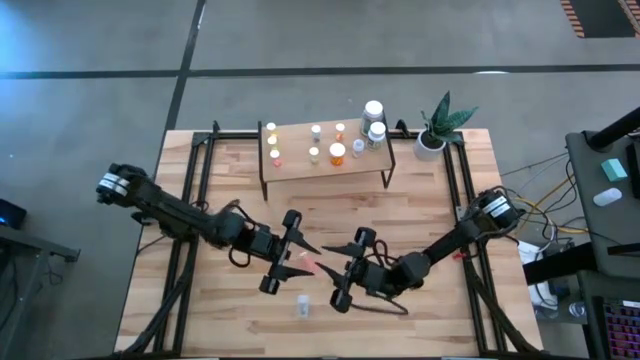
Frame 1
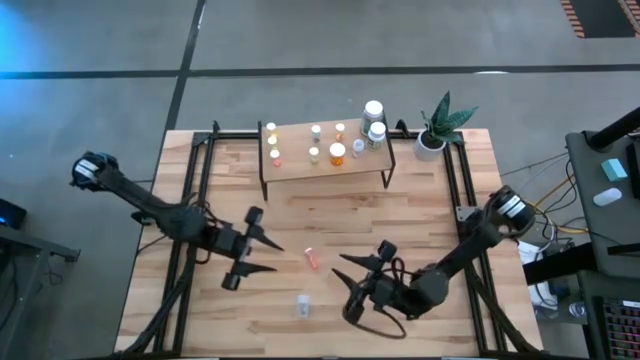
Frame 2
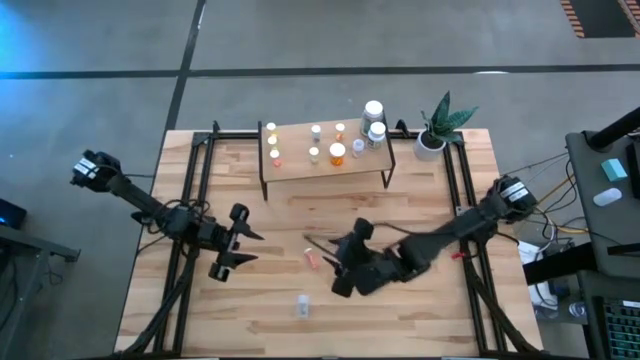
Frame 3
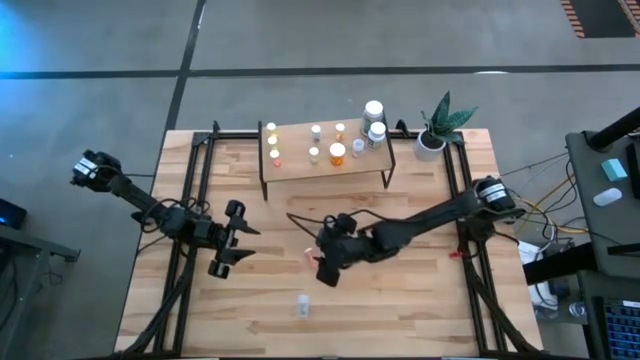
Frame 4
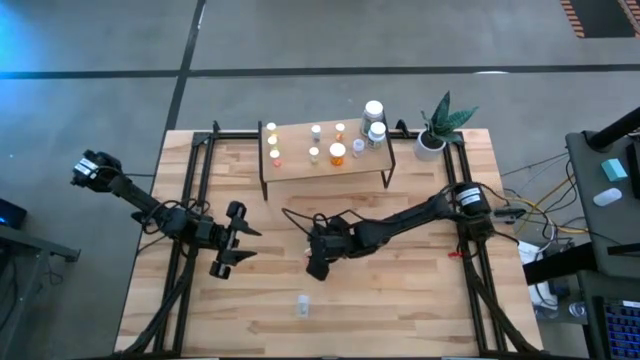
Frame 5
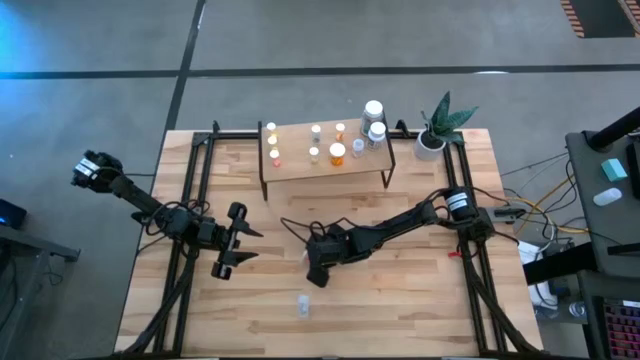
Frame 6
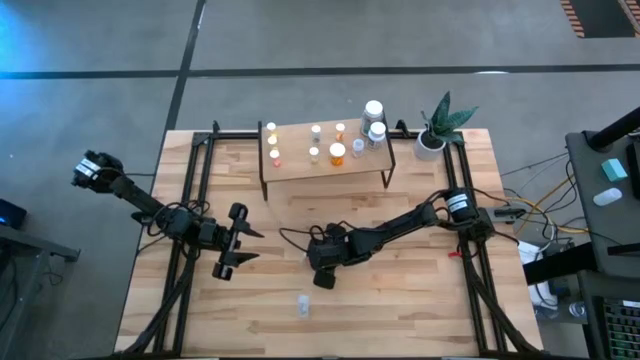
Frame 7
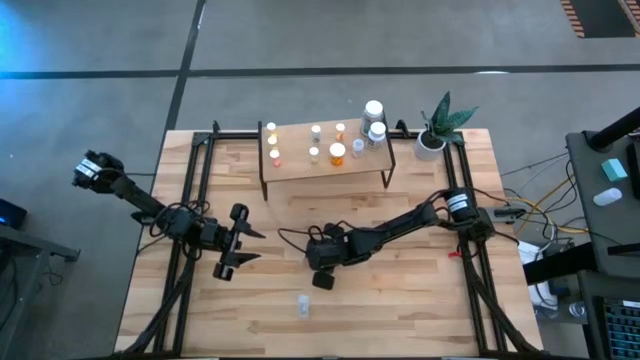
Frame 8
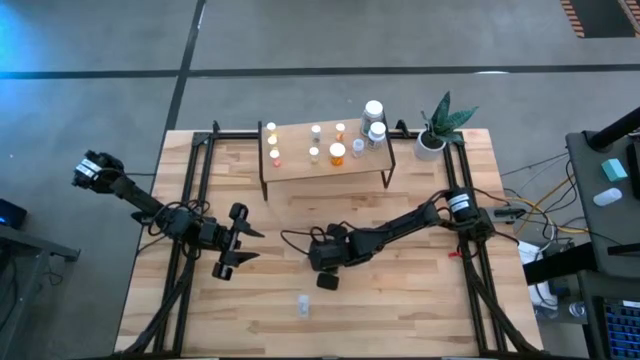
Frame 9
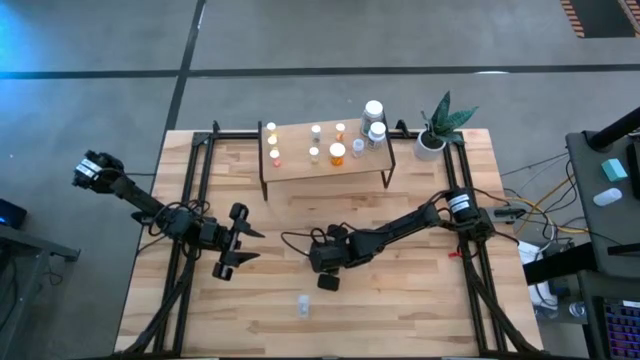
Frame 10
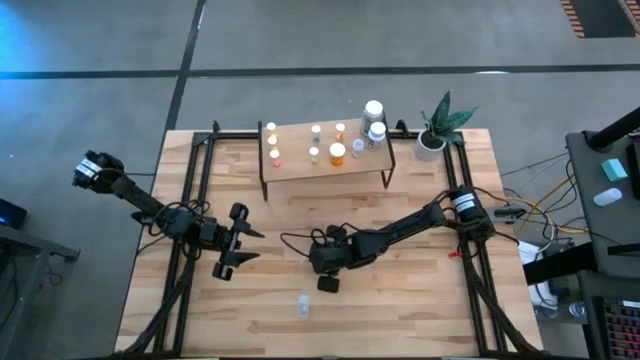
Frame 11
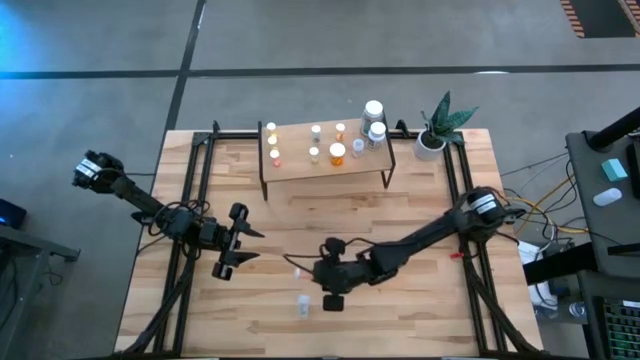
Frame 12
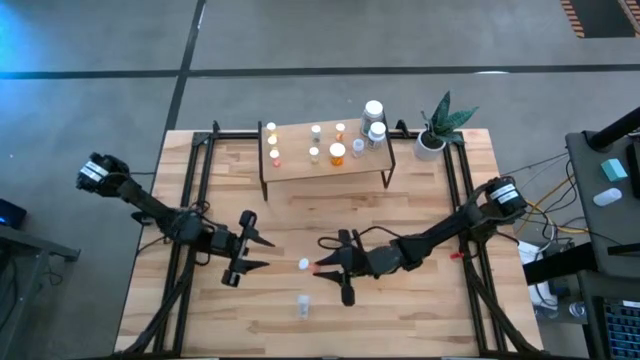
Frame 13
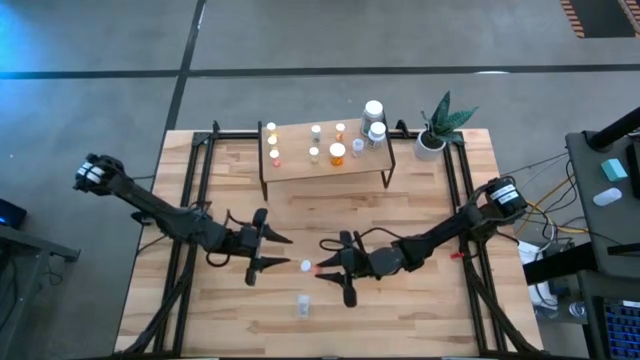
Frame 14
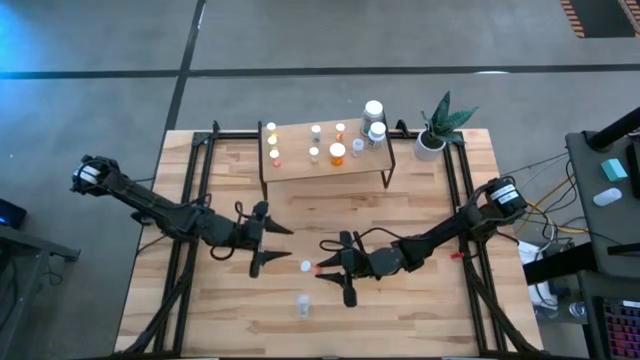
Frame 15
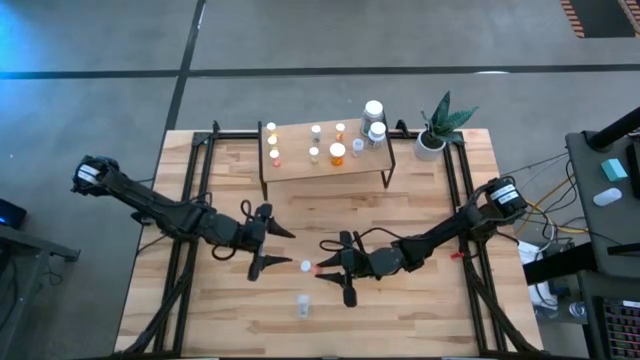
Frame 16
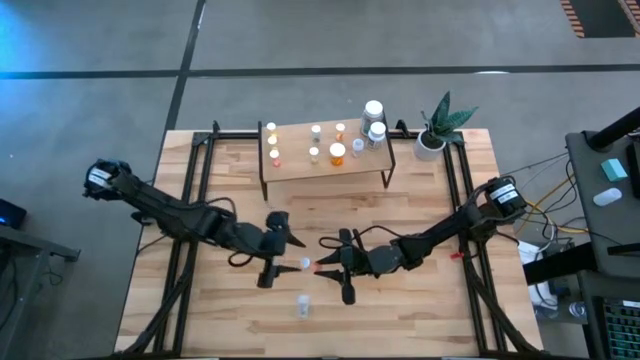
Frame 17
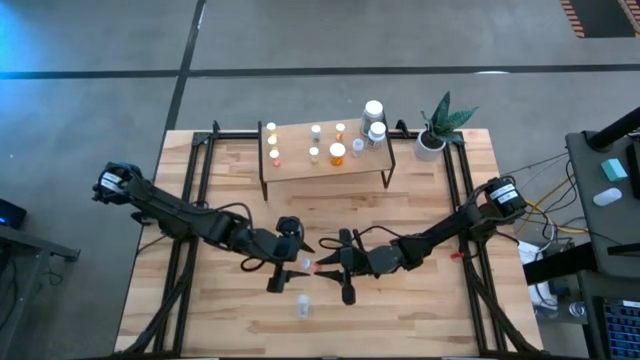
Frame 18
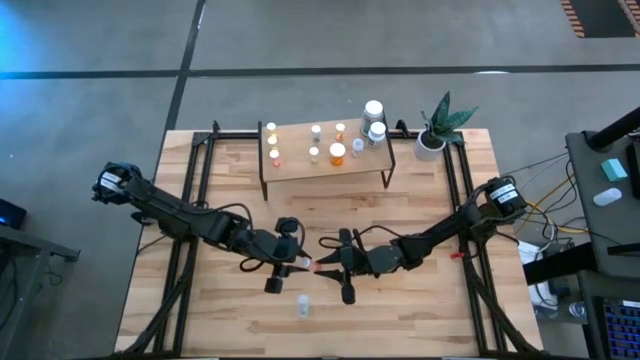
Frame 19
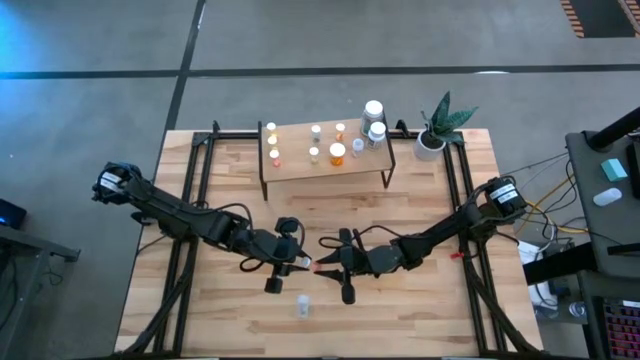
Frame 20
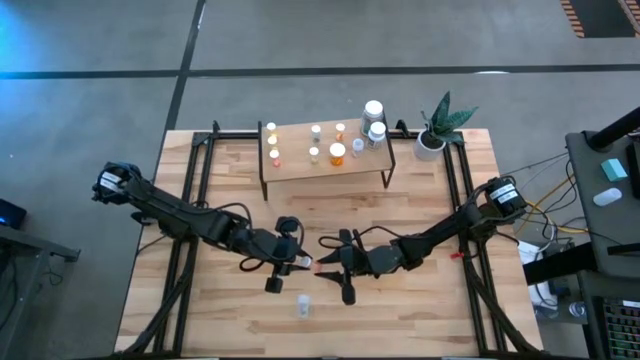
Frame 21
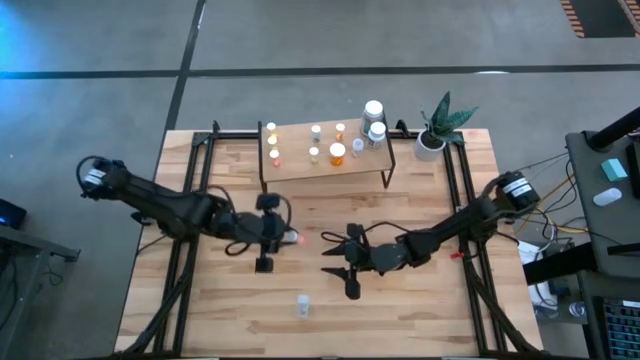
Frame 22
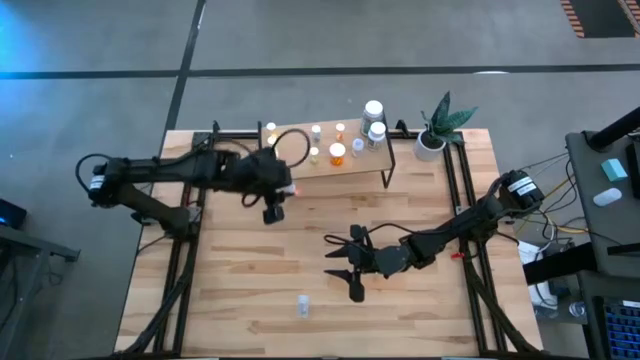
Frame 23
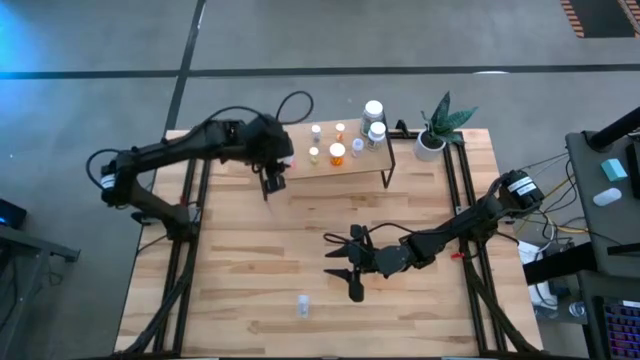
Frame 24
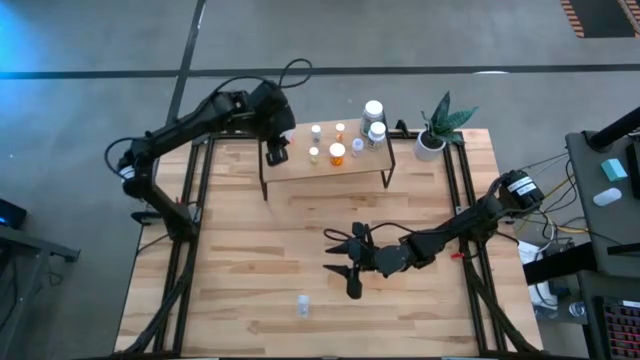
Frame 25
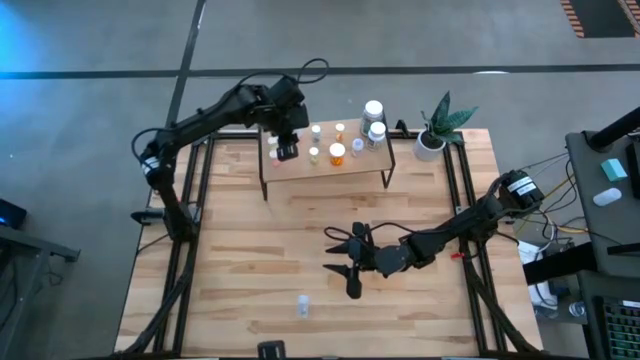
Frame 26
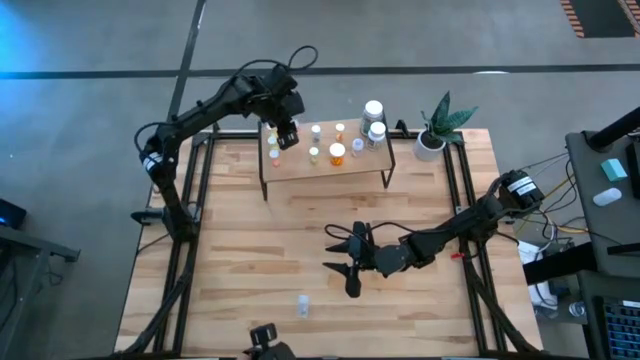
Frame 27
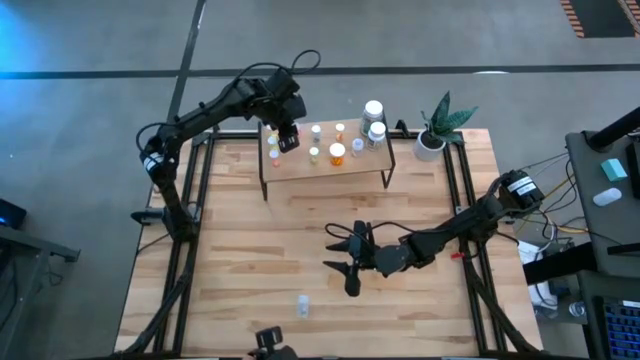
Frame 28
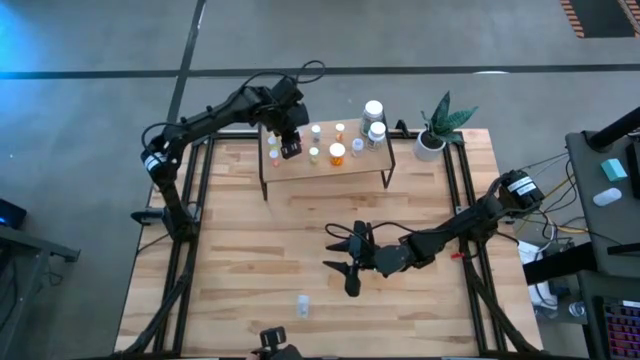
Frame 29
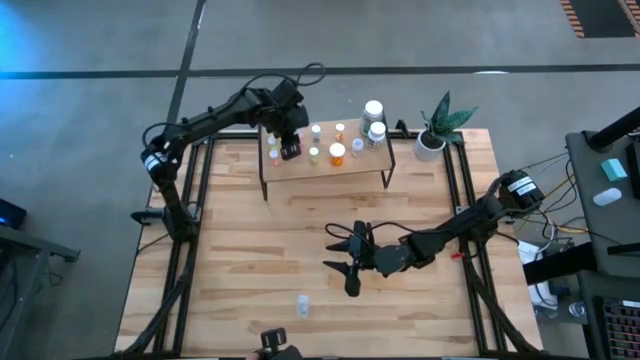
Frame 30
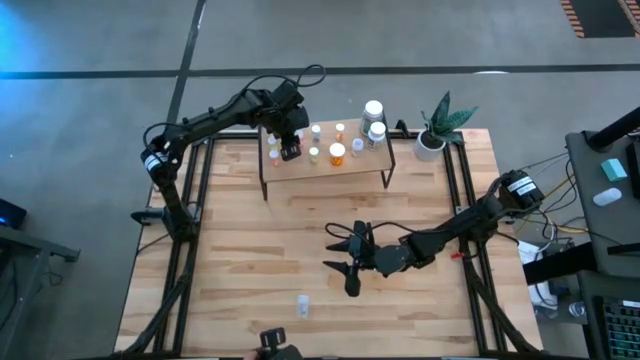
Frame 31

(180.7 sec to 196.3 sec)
Task: Pick and place medicine bottles onto shelf by color
Put the pink pill bottle on the shelf

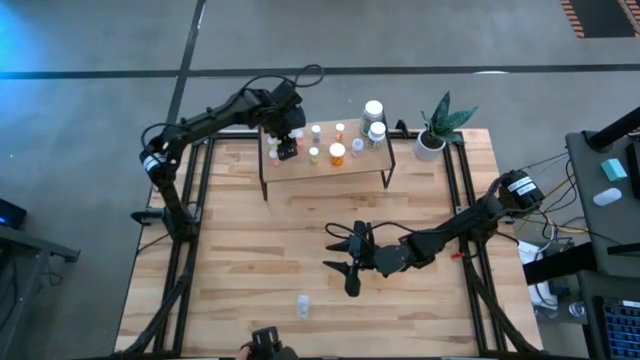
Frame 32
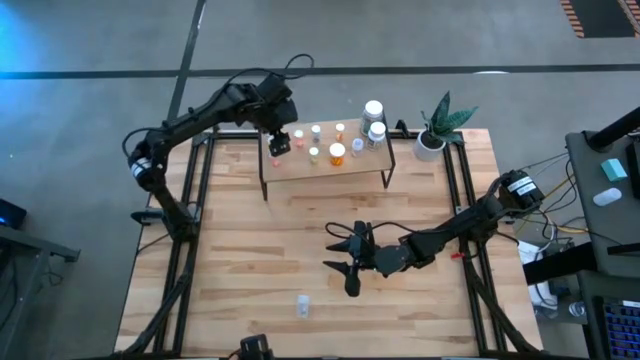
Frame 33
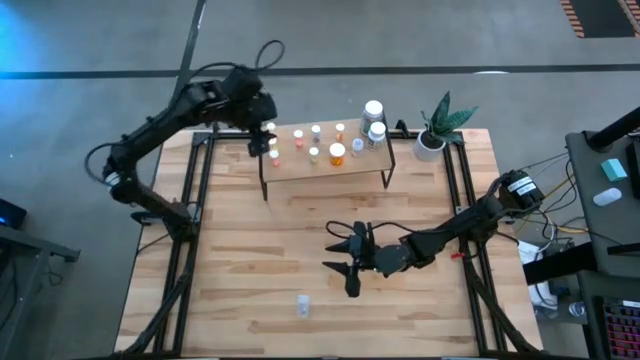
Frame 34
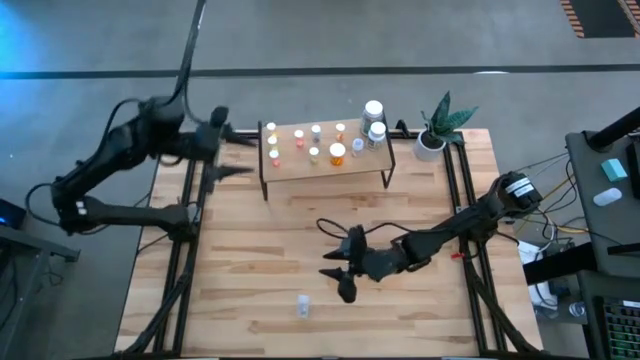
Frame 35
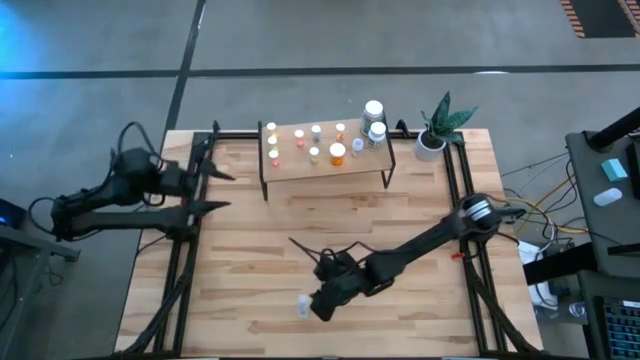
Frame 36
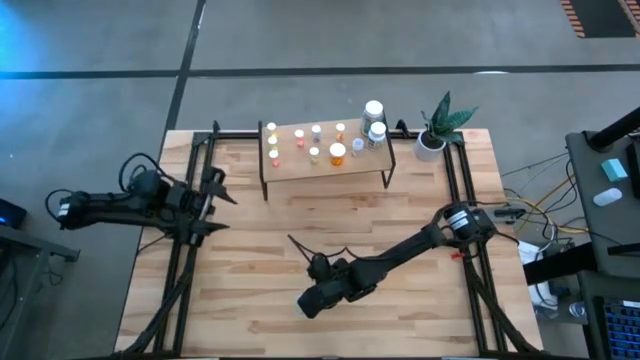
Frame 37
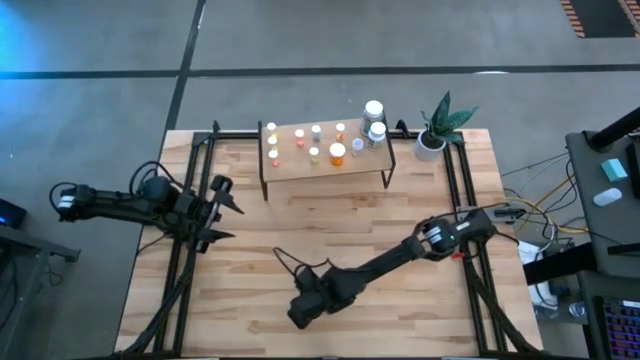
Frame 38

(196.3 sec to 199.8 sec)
Put the transparent pill bottle on the shelf

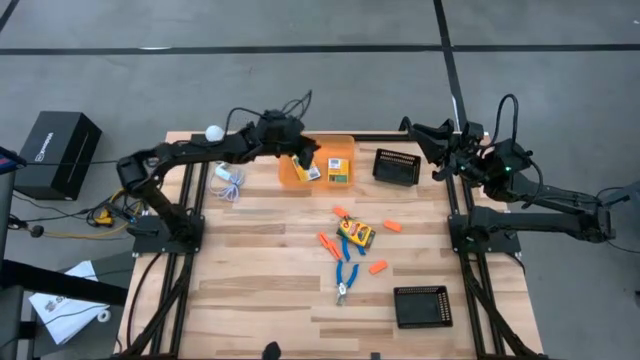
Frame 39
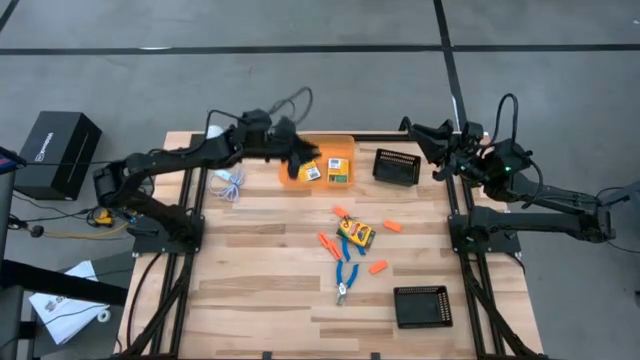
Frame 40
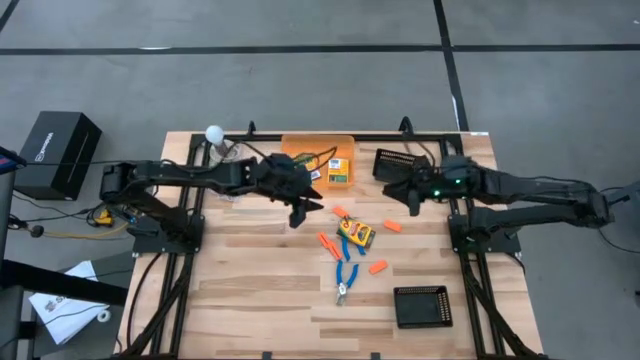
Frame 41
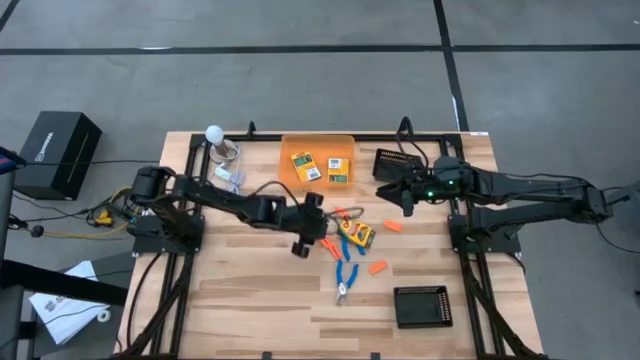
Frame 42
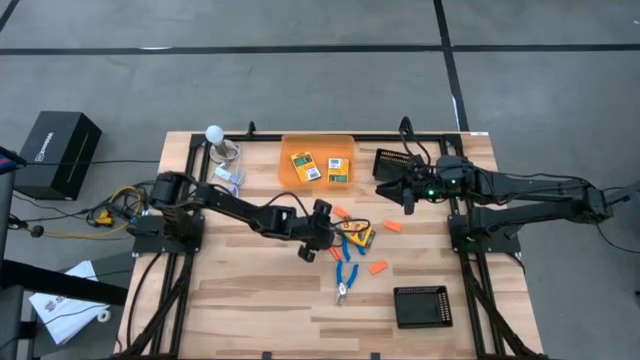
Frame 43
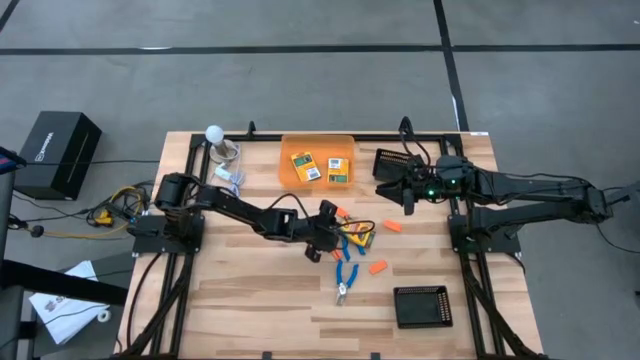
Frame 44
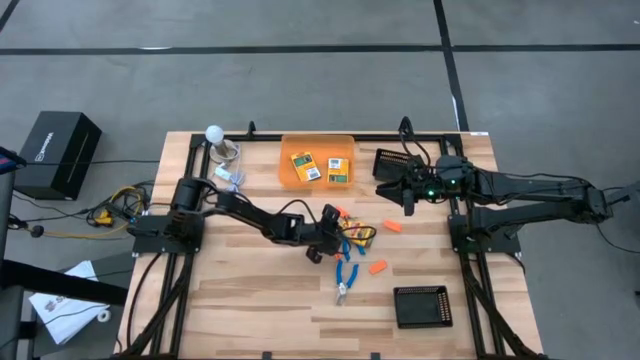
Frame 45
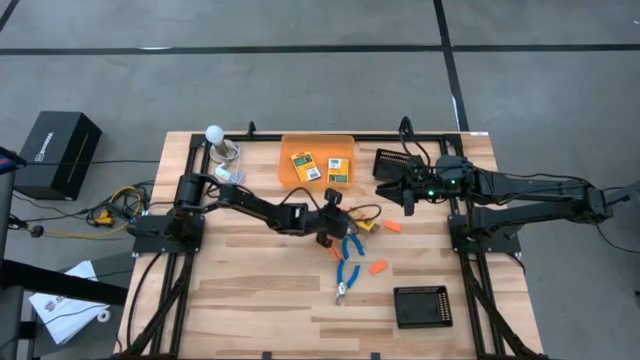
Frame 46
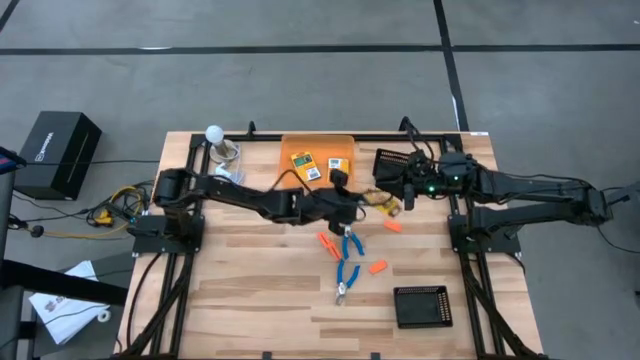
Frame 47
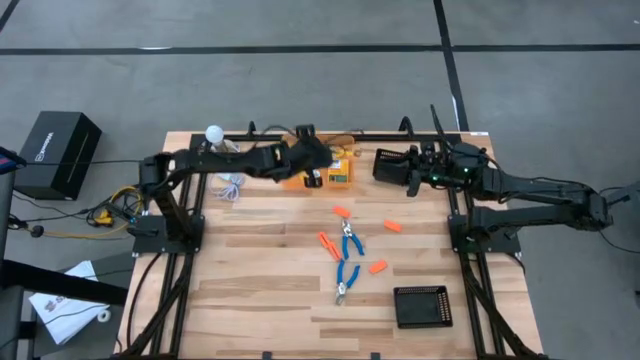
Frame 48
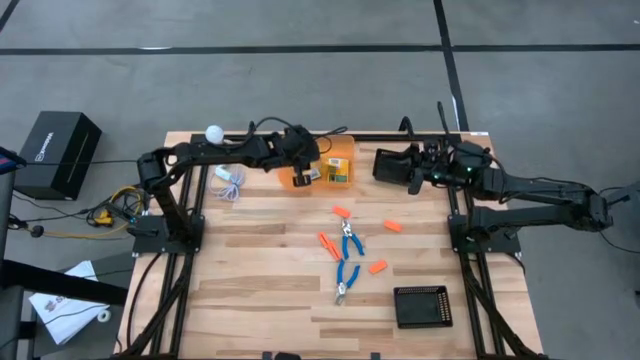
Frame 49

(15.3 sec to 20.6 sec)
Task: Pick & Place School Supplies
Put the yellow crayon box into the orange bin
